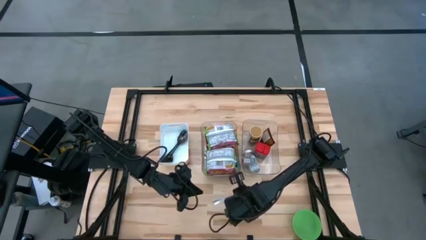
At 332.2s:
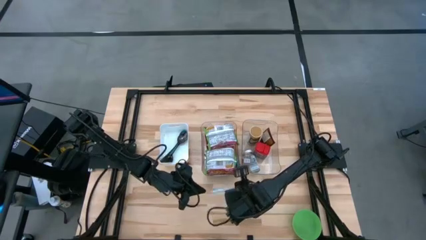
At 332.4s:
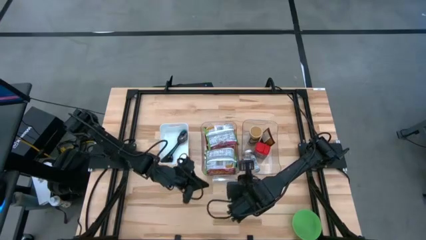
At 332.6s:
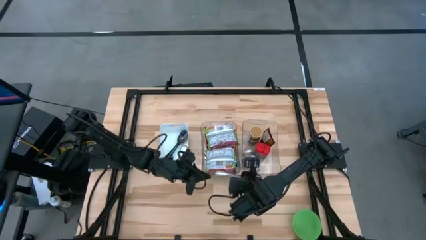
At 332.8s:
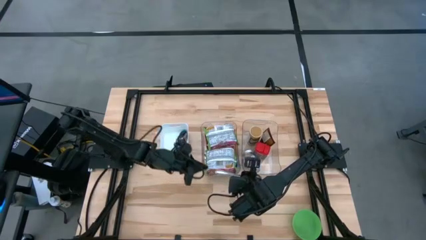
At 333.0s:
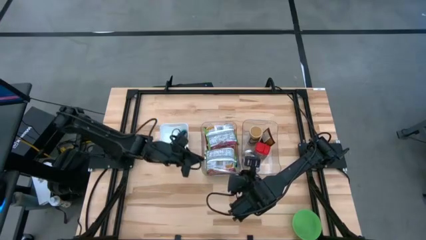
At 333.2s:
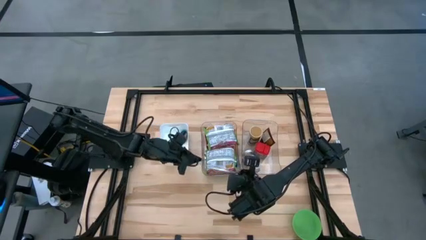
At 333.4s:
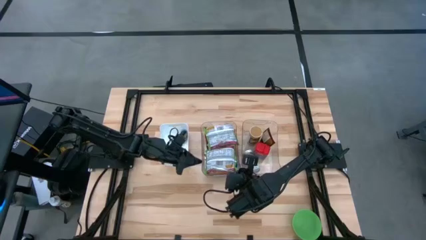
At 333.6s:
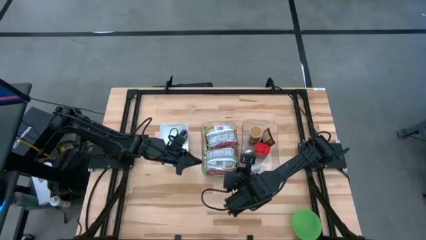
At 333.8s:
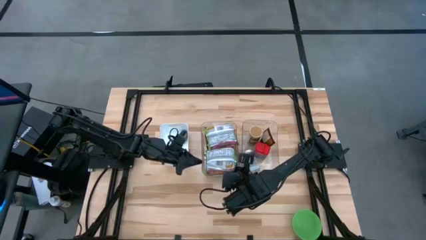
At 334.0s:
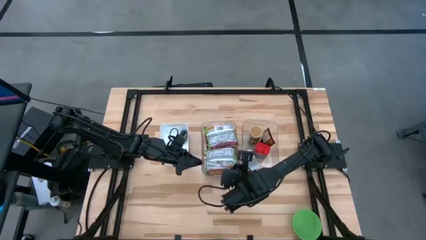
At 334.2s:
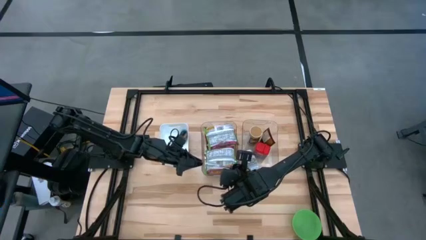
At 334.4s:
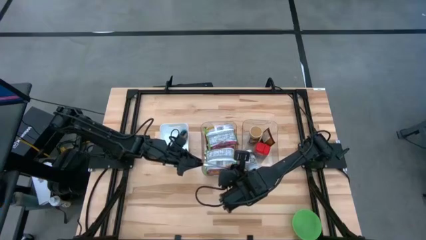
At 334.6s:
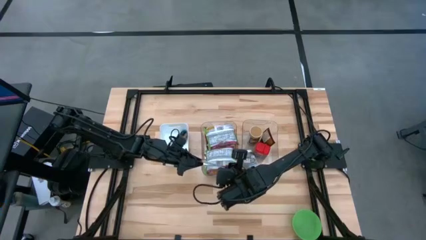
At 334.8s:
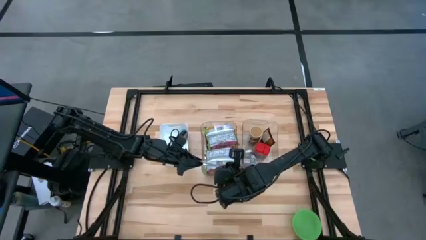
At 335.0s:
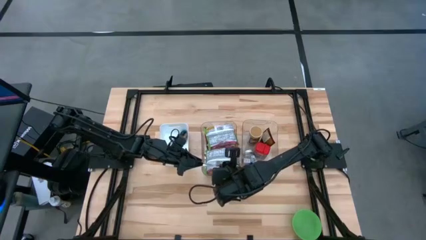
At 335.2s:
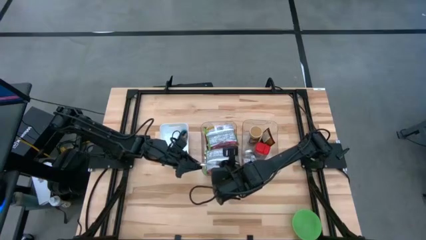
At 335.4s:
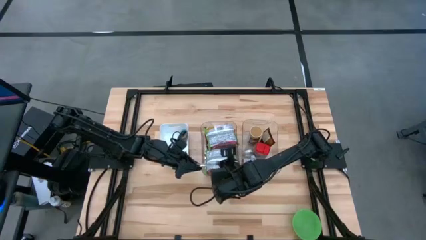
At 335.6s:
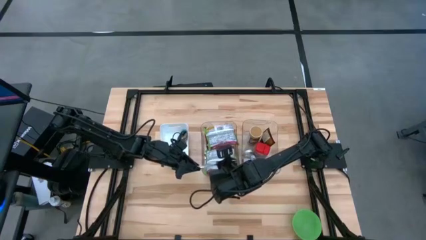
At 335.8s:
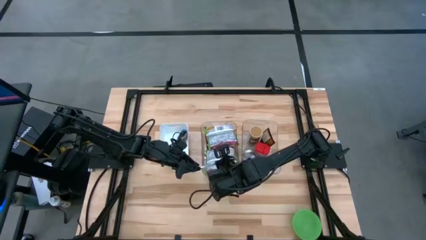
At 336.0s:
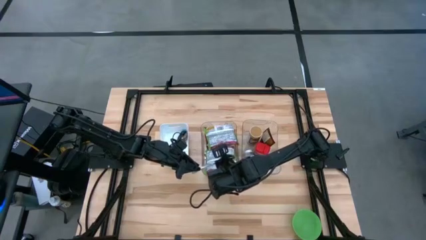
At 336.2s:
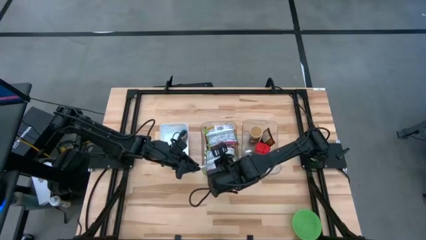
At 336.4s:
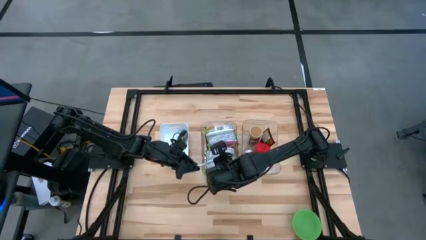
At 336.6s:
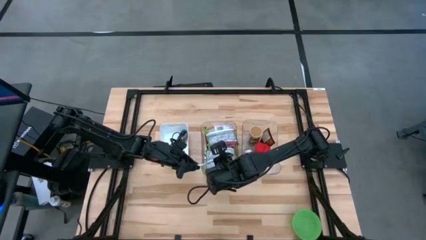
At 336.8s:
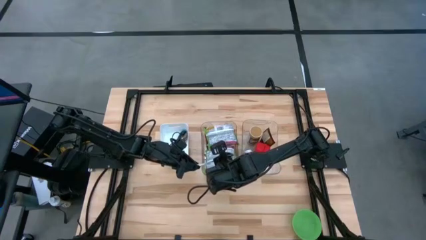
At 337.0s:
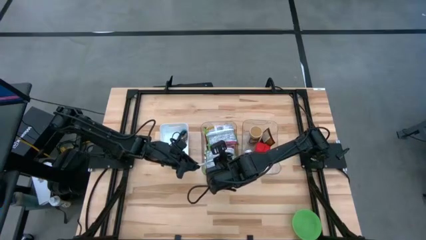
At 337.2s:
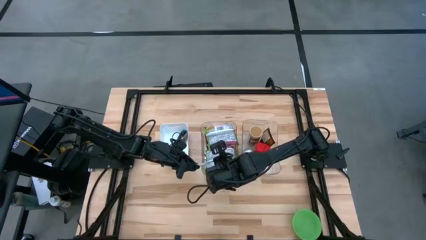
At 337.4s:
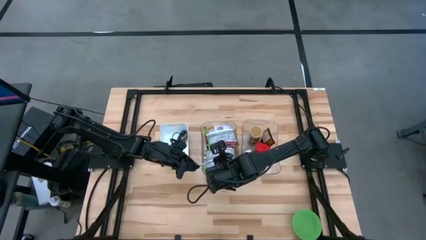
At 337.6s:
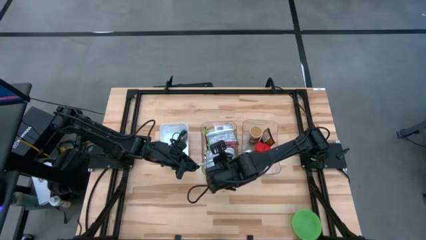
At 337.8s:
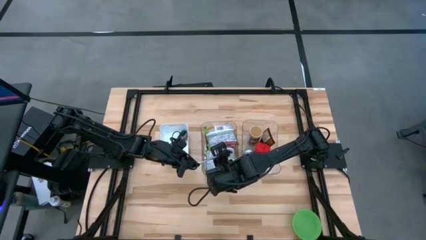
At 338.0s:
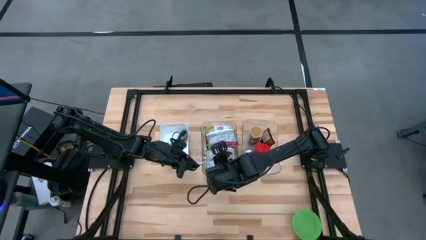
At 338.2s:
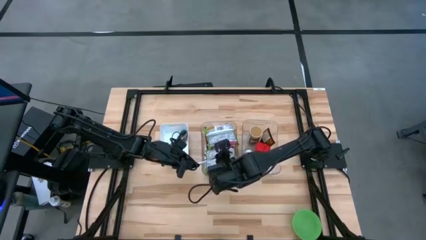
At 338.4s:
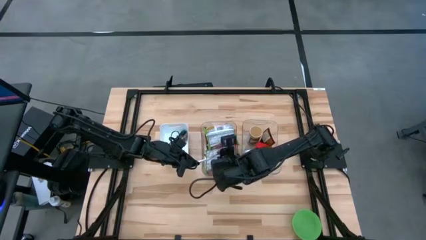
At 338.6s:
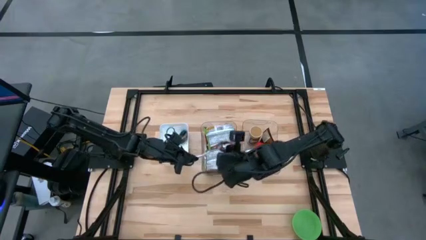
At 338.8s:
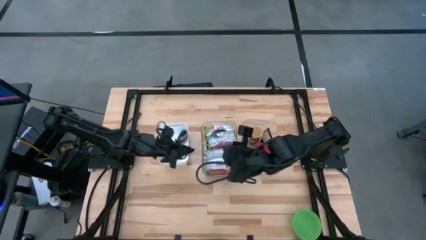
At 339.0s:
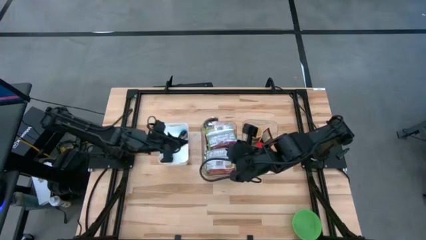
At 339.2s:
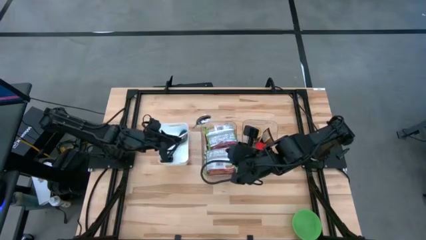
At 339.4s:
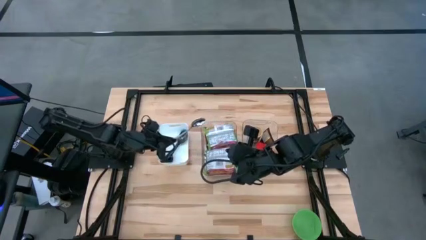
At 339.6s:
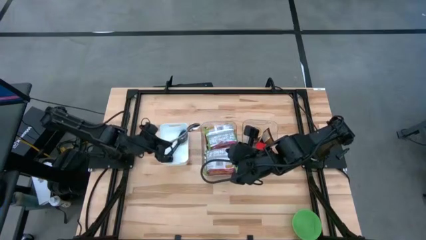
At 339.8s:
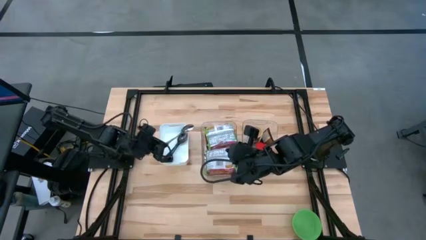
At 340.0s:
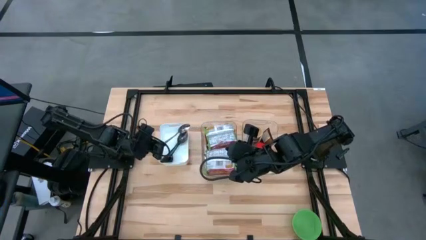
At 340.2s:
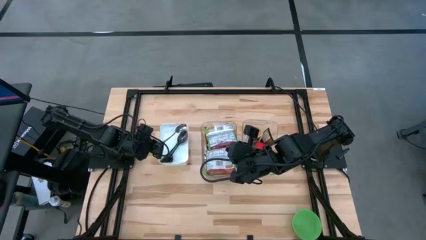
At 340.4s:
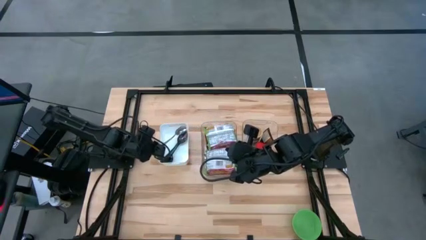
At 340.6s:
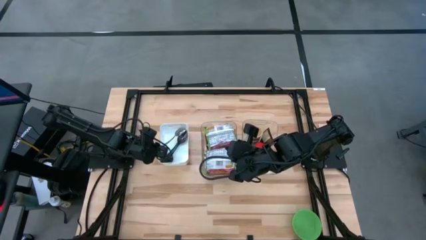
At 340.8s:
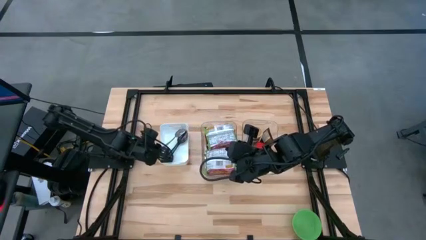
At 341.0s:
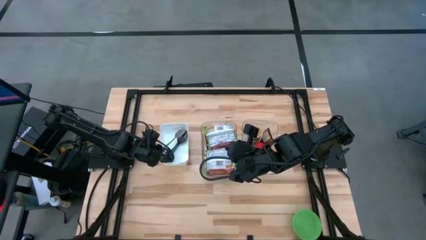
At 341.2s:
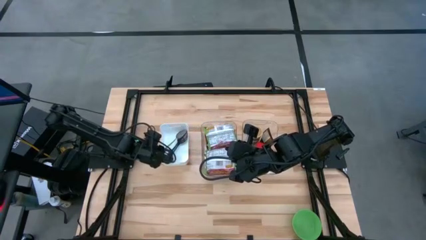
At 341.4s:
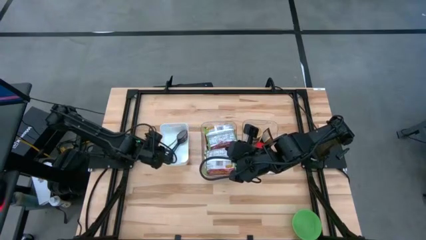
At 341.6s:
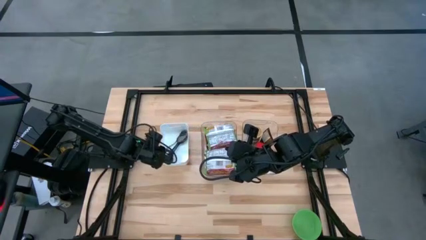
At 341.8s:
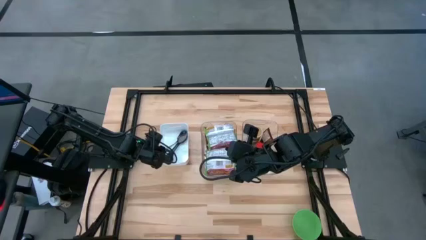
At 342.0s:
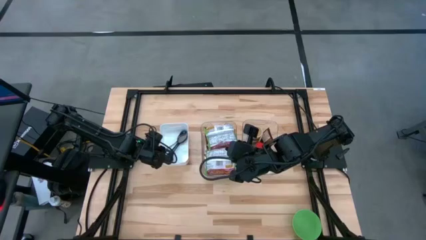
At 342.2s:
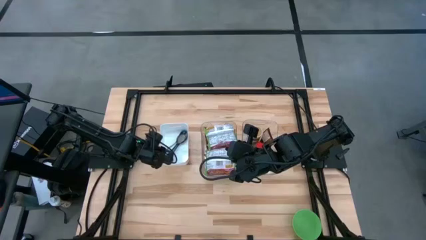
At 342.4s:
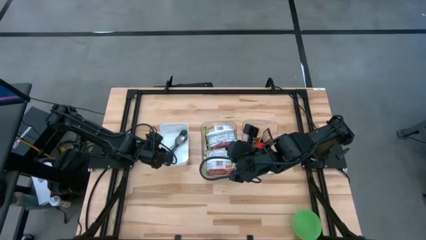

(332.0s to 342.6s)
Task: Pick & Place Food Item
Put the silver spoon into the white bin
